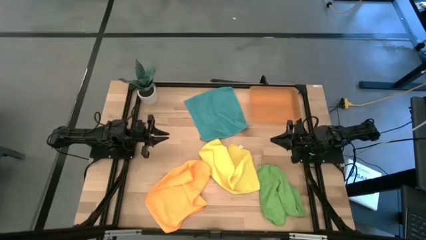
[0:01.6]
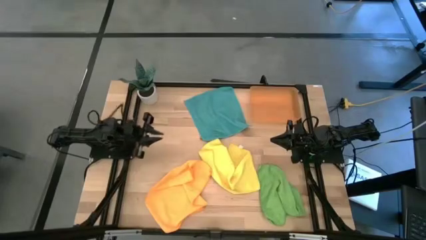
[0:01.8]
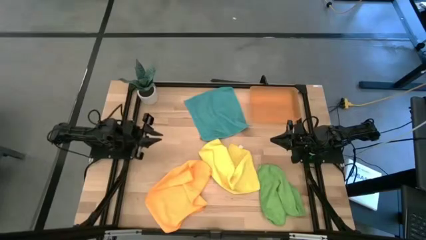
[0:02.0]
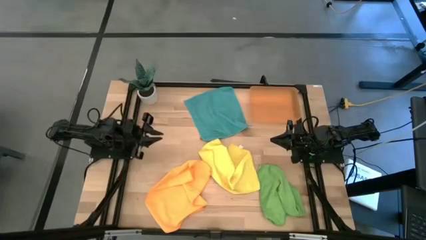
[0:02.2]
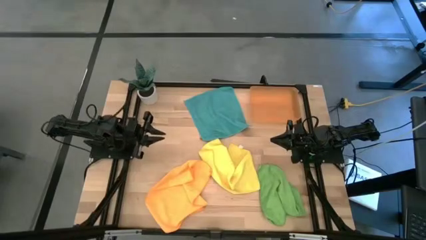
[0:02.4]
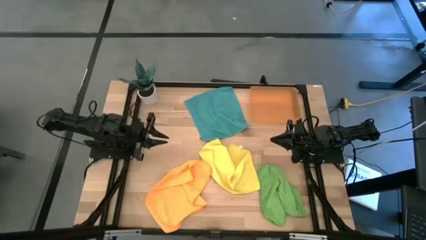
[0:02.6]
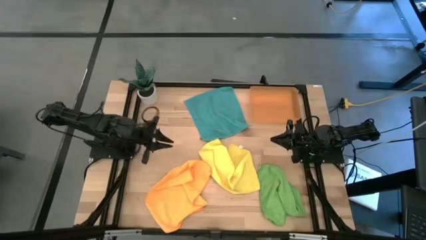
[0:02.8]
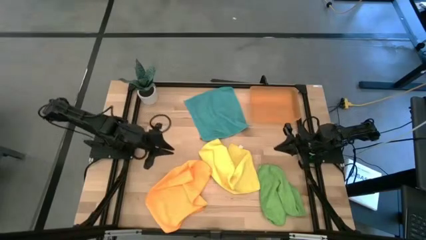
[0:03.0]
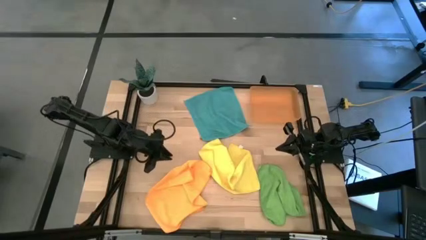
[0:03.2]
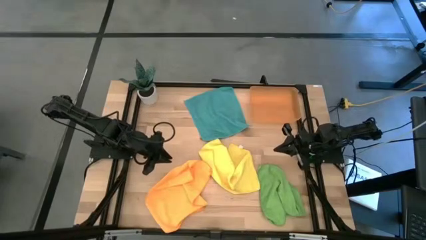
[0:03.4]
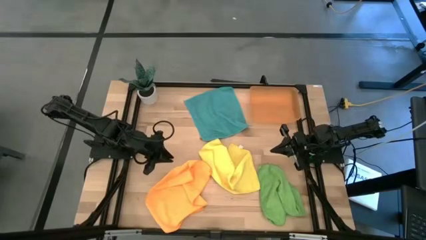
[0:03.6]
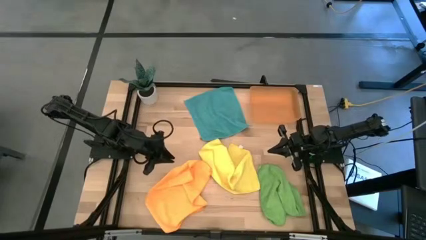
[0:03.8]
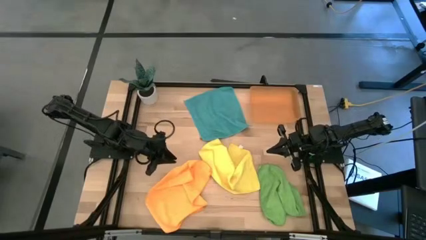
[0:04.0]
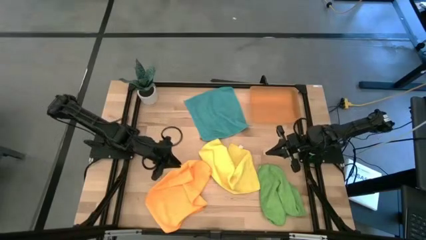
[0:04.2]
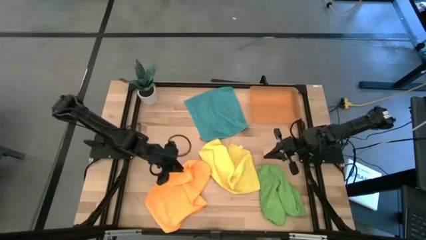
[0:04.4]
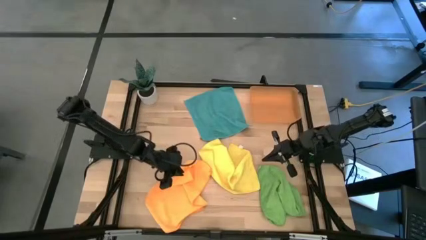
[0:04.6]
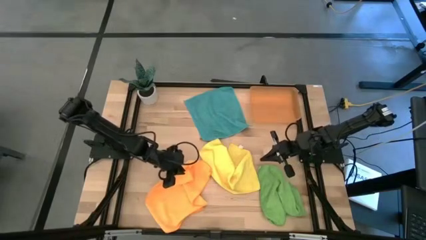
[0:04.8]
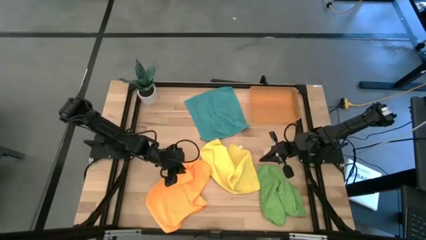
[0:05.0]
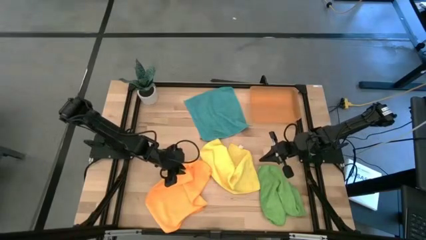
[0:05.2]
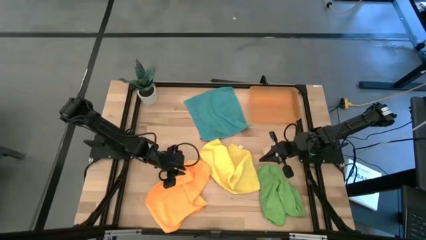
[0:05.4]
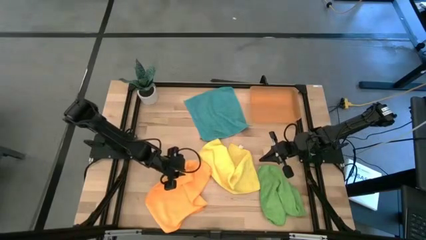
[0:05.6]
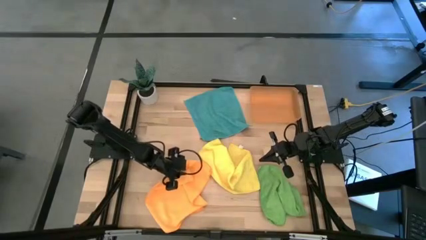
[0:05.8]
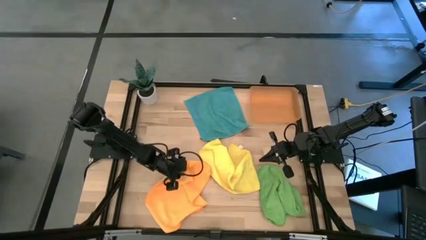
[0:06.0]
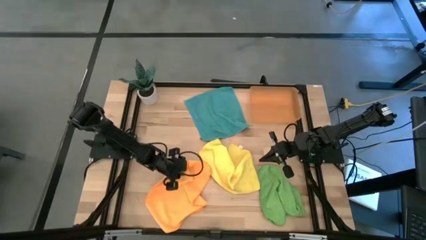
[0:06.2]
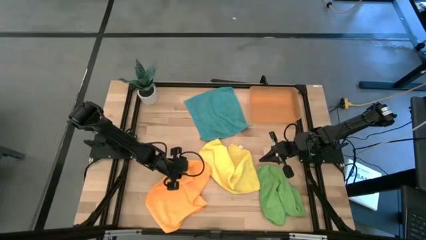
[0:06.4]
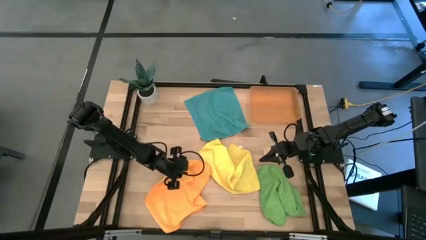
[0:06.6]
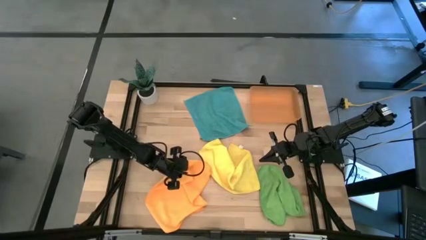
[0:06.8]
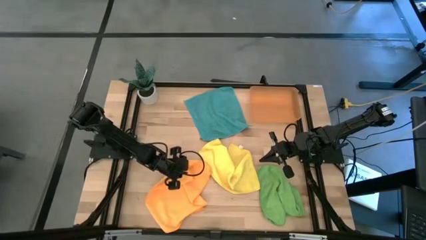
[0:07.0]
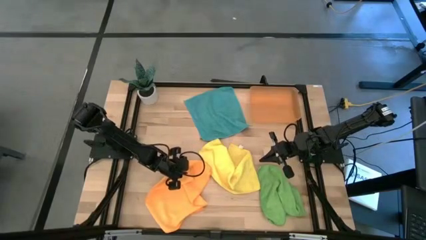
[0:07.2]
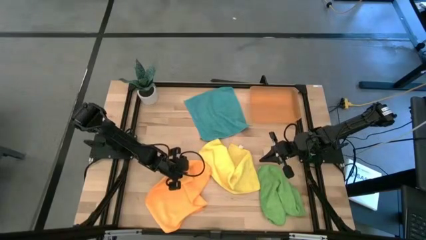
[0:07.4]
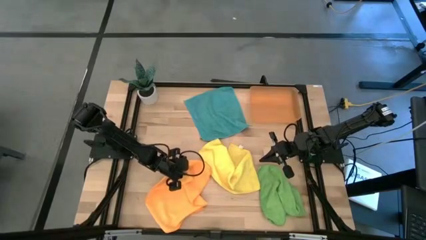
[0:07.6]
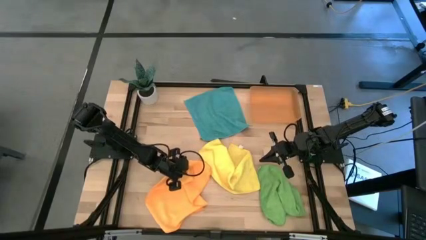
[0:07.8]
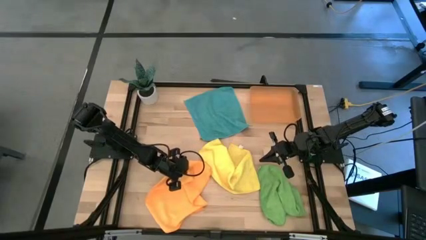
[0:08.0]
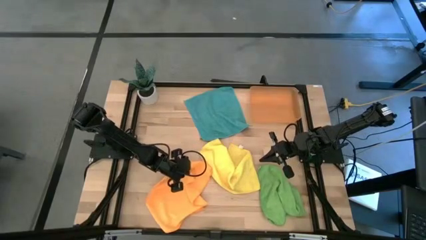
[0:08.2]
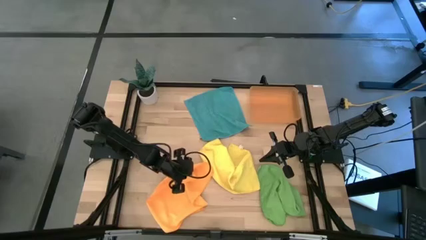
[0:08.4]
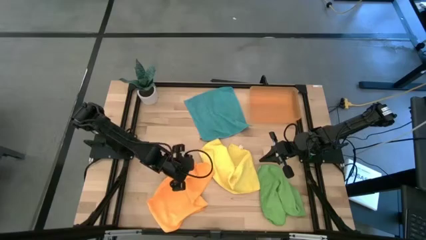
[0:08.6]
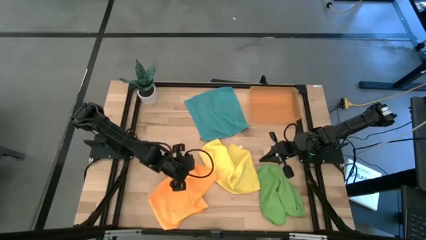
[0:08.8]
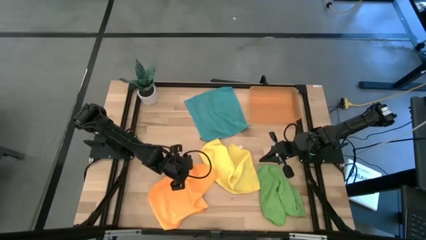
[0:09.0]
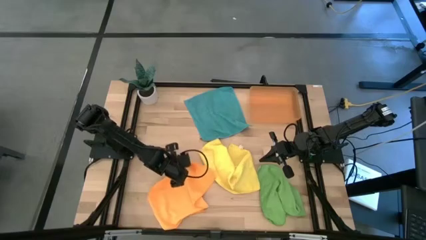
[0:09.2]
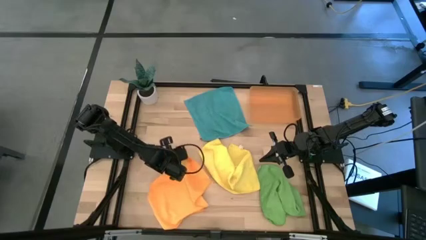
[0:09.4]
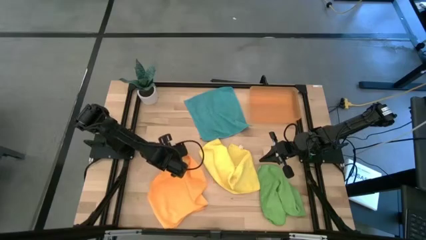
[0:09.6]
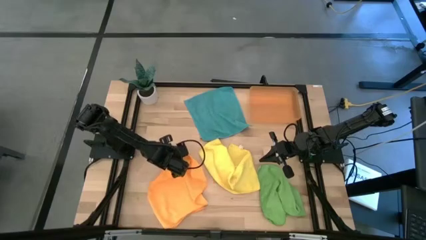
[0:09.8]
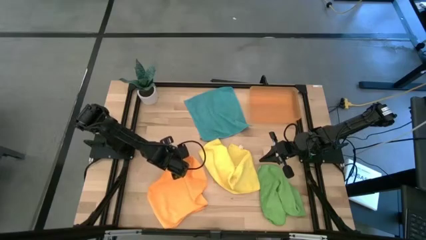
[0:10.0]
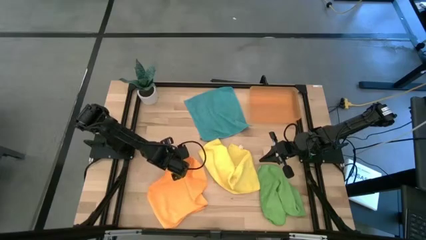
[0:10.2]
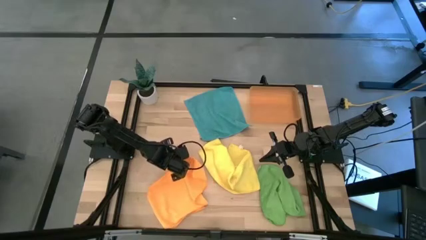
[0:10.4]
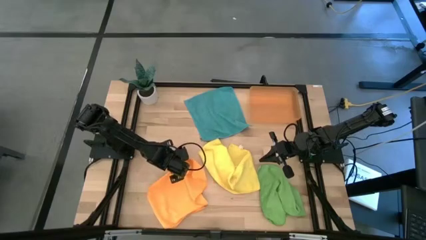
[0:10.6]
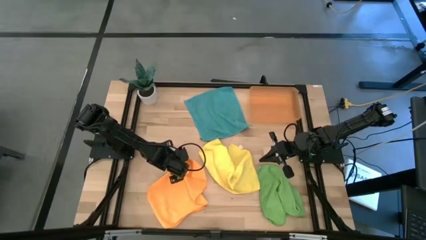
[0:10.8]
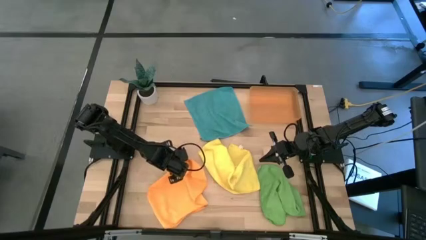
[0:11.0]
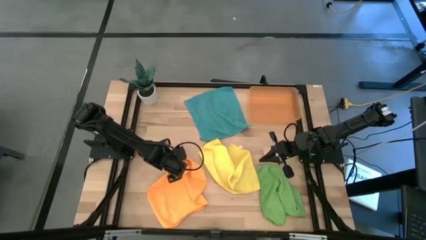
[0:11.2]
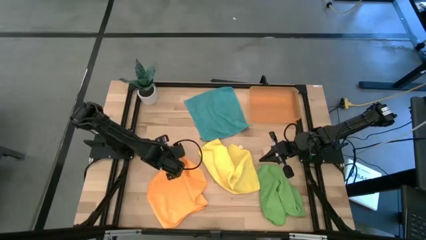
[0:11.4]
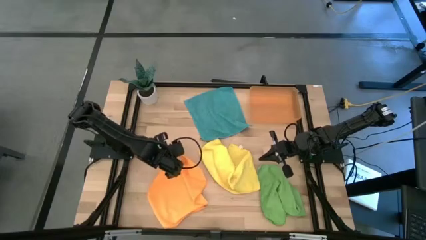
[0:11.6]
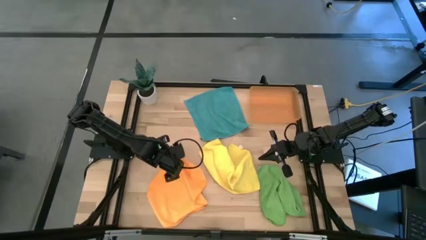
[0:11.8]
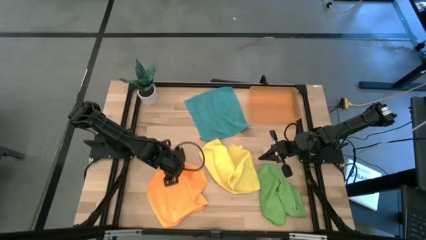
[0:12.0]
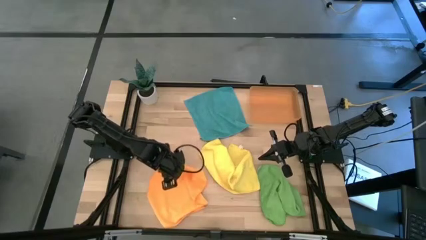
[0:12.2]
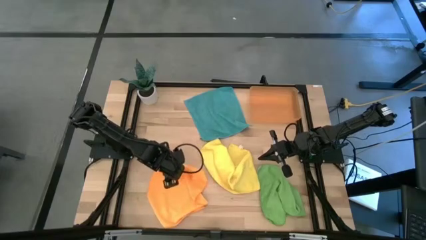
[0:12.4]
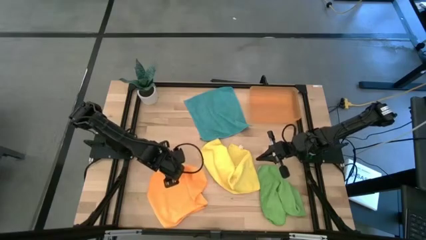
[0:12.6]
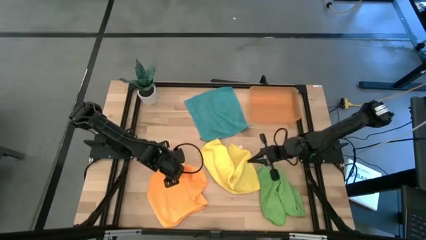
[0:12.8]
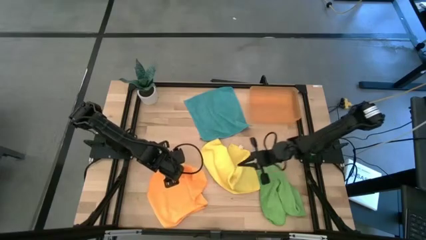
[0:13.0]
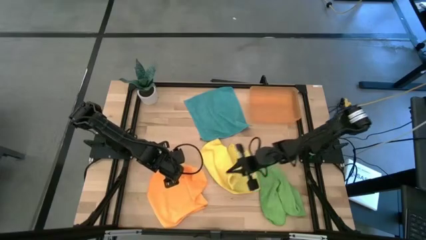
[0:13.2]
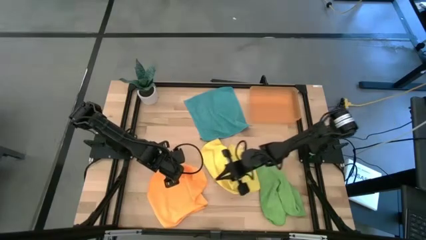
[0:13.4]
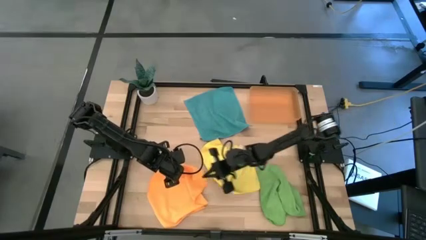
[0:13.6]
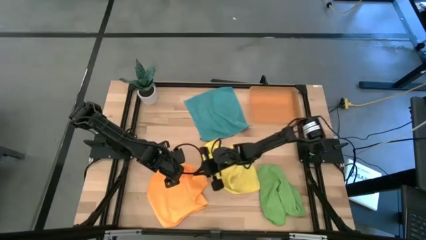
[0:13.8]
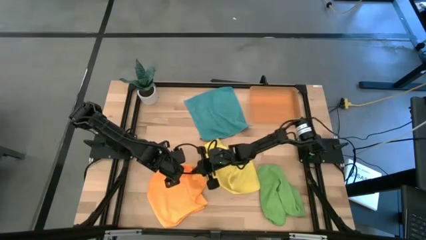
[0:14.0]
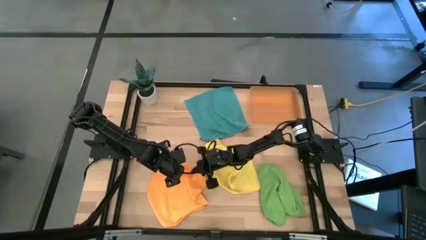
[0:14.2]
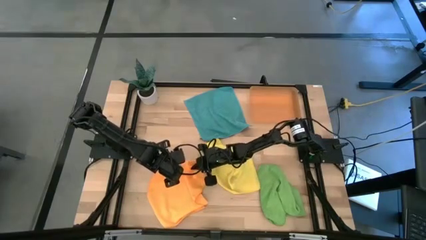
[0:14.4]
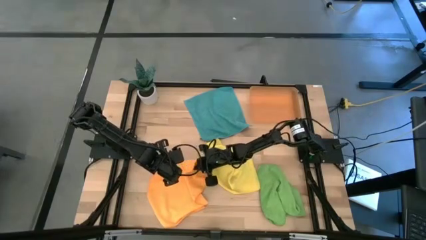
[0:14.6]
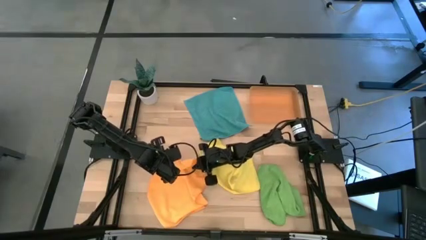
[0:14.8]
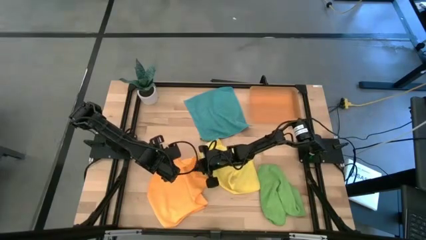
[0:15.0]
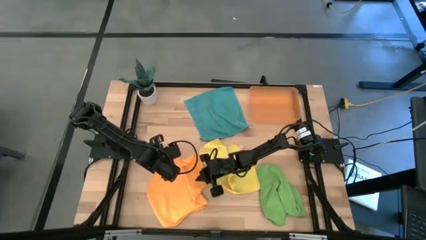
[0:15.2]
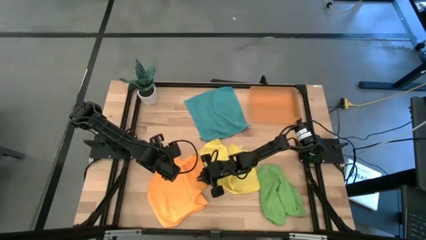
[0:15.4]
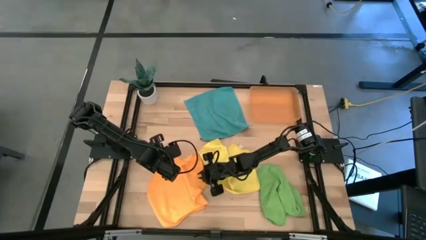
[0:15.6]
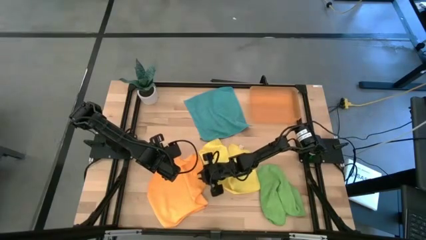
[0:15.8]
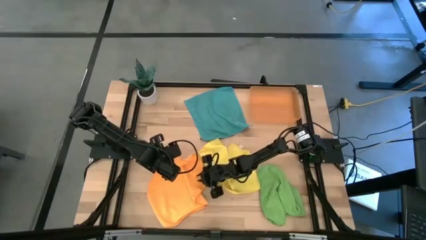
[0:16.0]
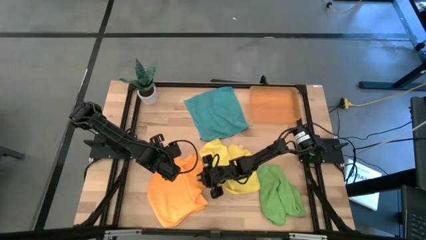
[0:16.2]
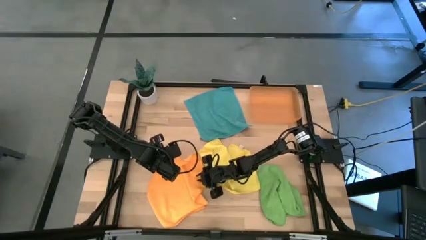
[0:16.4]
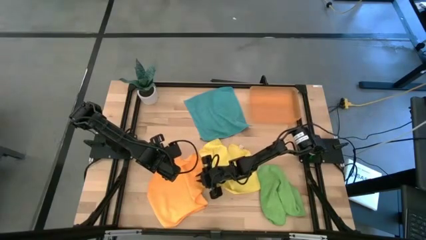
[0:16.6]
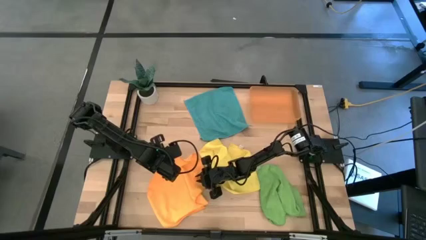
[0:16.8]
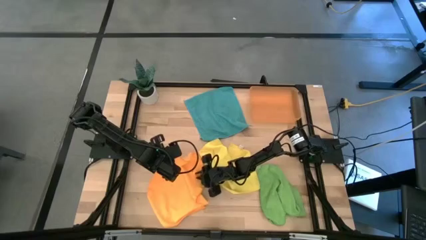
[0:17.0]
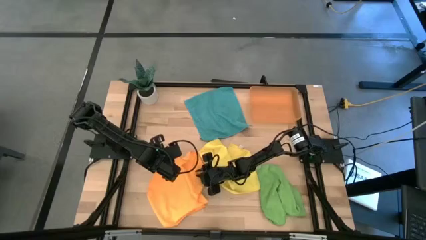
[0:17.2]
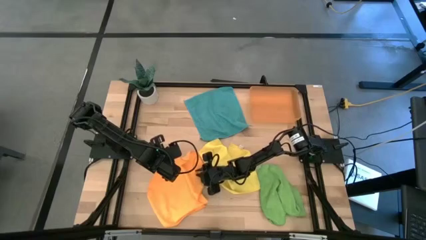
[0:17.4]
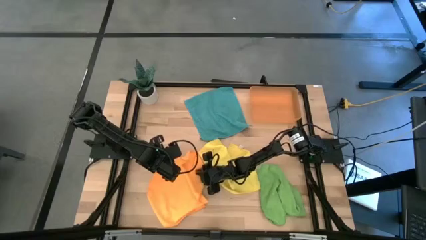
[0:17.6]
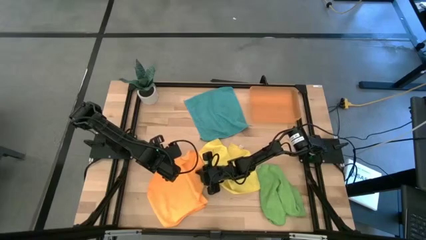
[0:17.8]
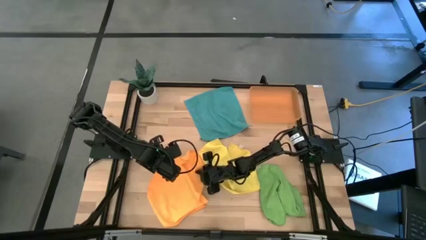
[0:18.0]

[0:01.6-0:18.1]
Task: Roll microfiber towels into tight, uniform cylinder then place into a basket
Roll the orange microfiber towel
